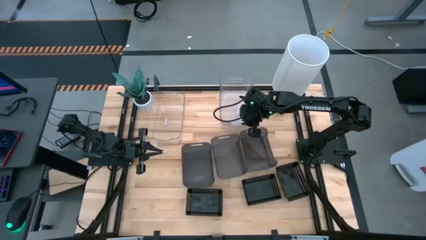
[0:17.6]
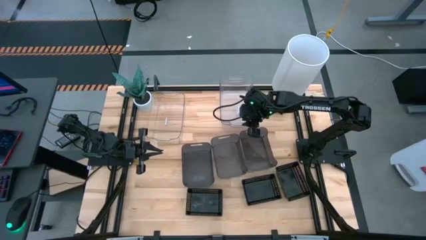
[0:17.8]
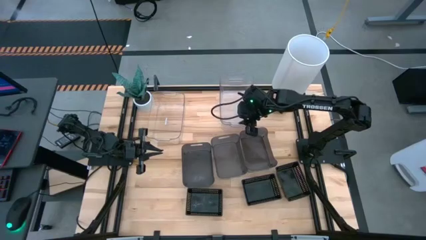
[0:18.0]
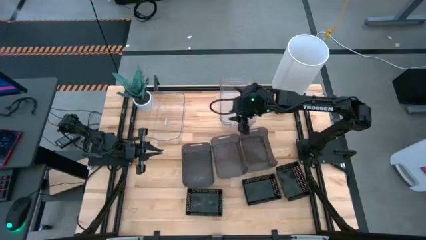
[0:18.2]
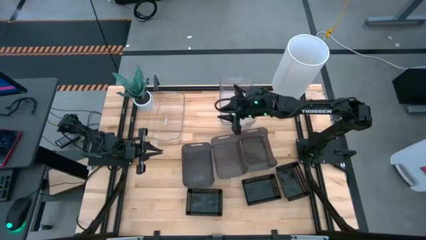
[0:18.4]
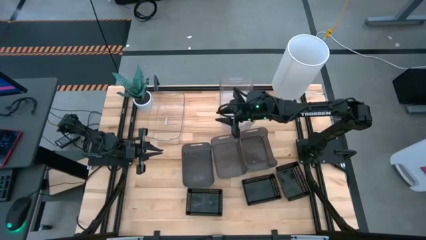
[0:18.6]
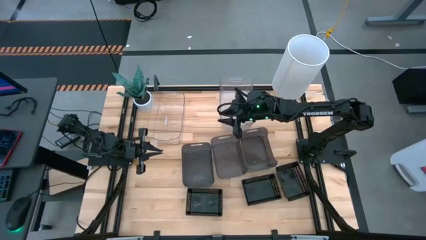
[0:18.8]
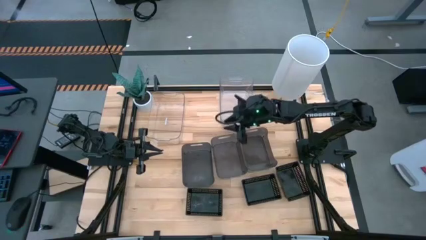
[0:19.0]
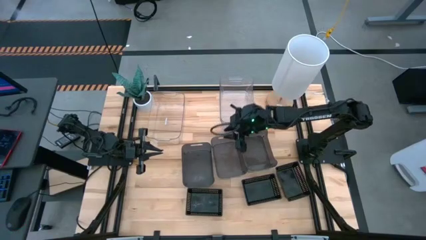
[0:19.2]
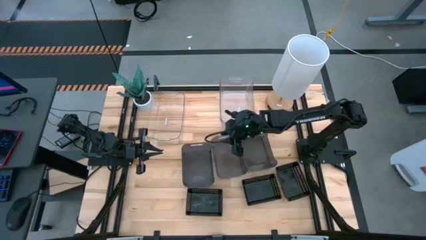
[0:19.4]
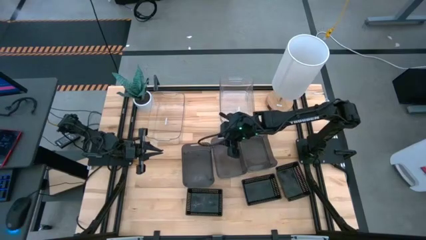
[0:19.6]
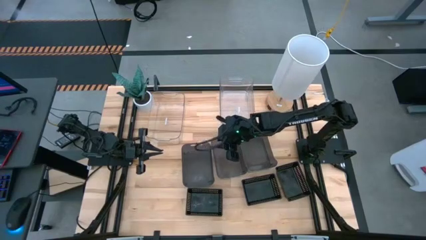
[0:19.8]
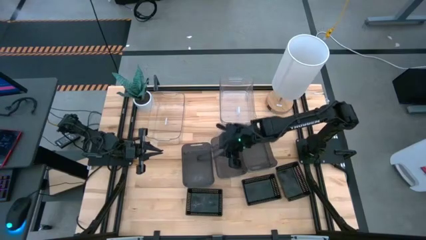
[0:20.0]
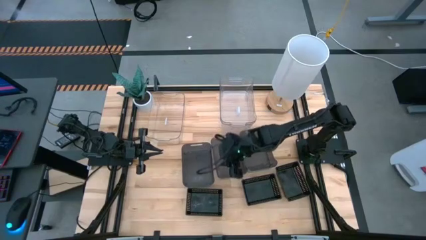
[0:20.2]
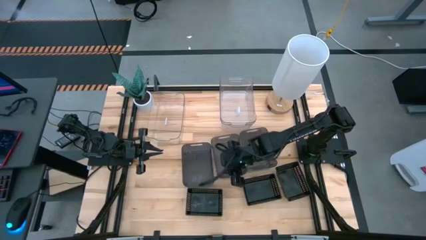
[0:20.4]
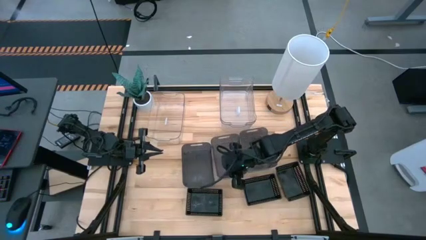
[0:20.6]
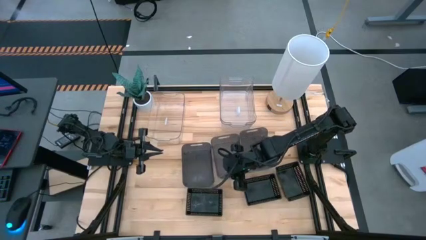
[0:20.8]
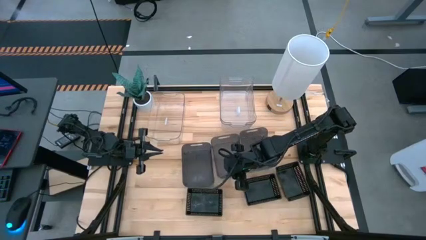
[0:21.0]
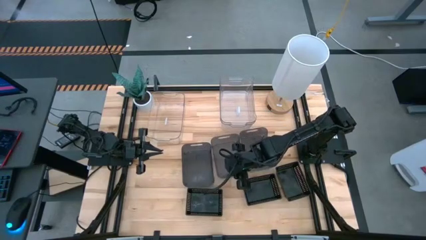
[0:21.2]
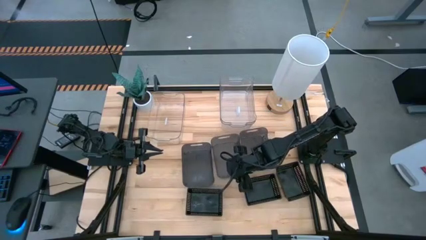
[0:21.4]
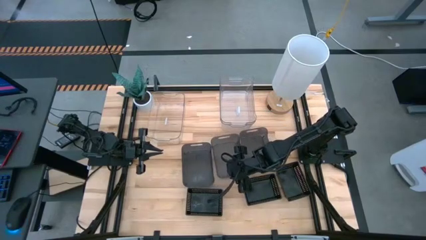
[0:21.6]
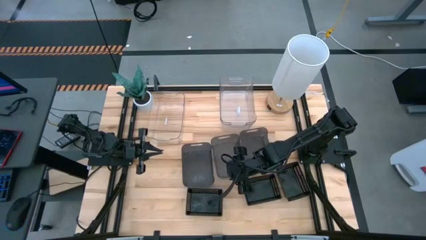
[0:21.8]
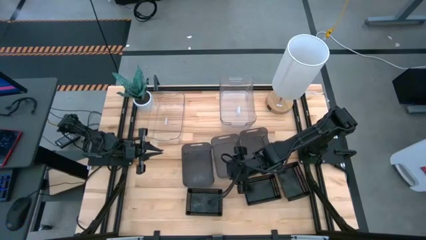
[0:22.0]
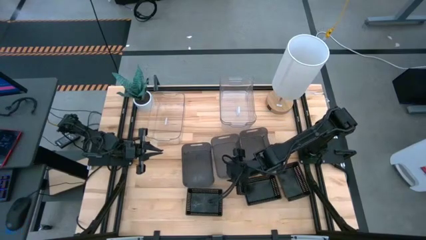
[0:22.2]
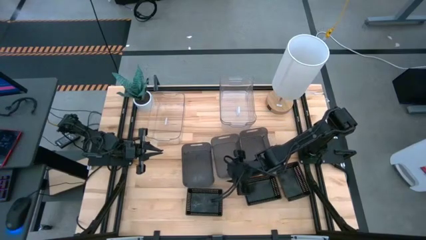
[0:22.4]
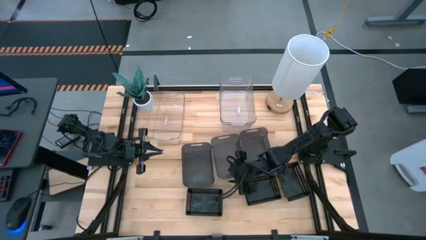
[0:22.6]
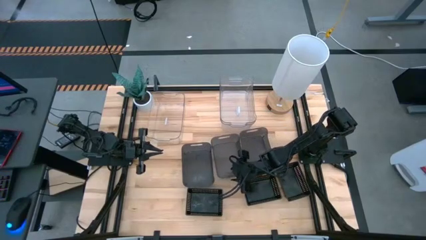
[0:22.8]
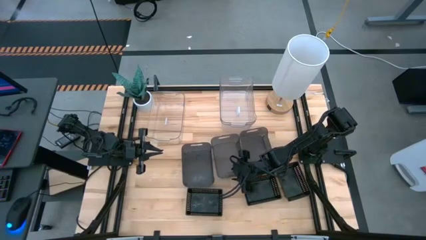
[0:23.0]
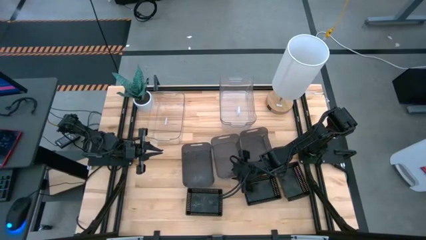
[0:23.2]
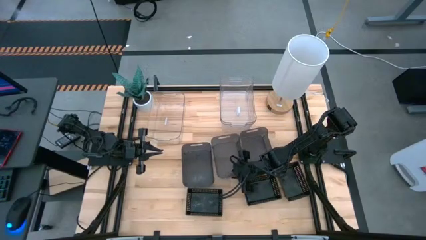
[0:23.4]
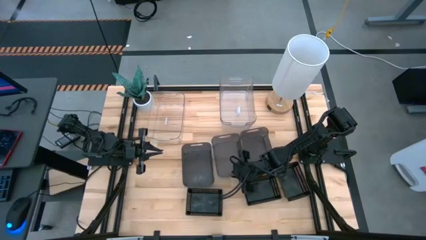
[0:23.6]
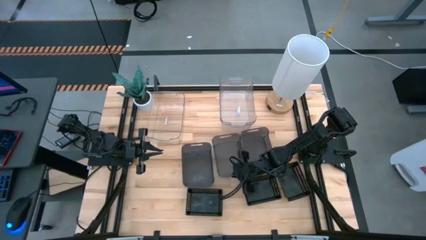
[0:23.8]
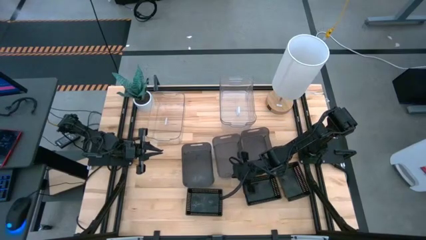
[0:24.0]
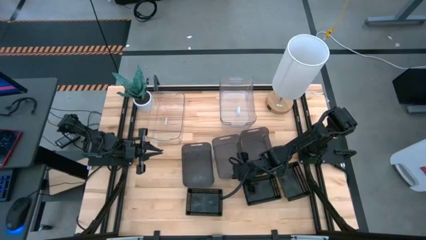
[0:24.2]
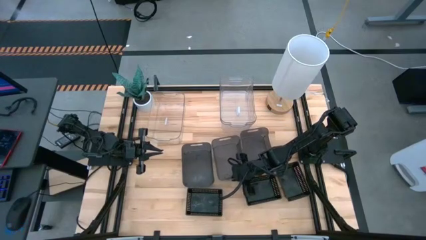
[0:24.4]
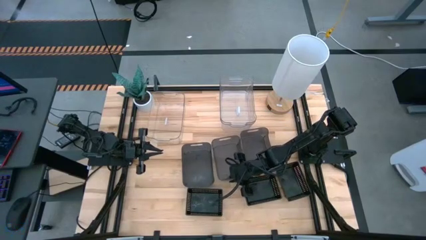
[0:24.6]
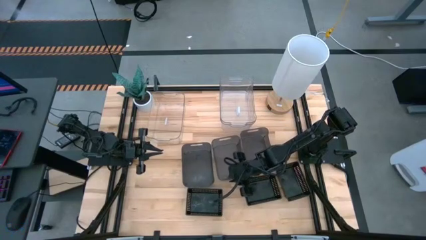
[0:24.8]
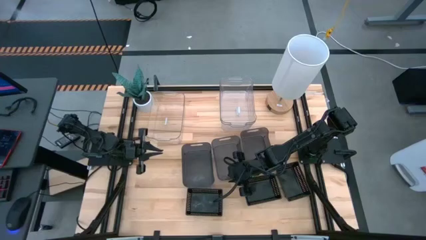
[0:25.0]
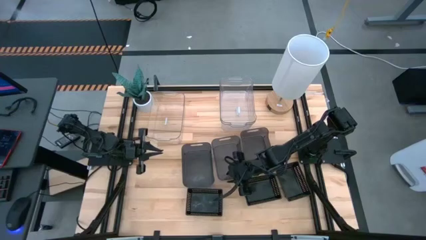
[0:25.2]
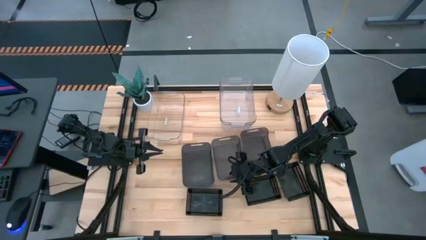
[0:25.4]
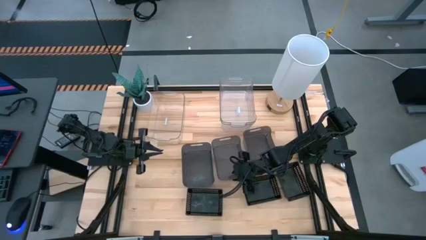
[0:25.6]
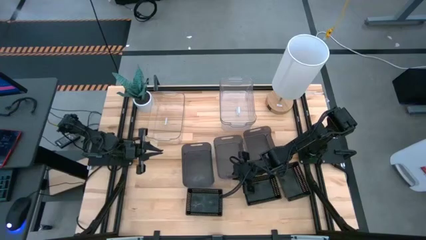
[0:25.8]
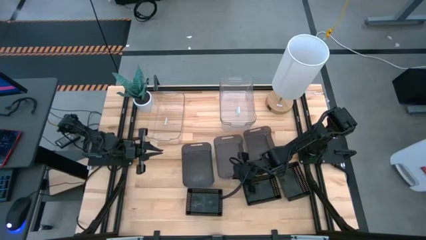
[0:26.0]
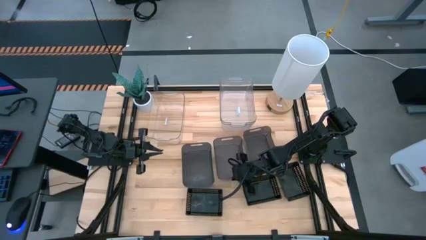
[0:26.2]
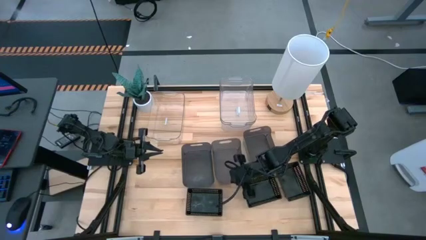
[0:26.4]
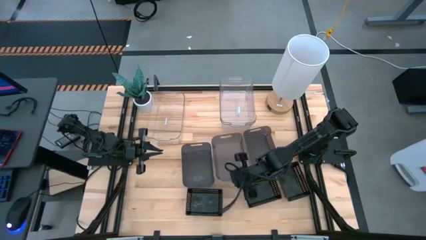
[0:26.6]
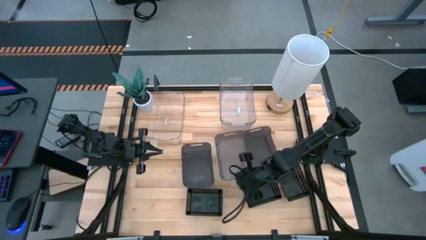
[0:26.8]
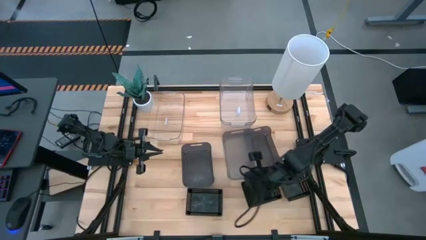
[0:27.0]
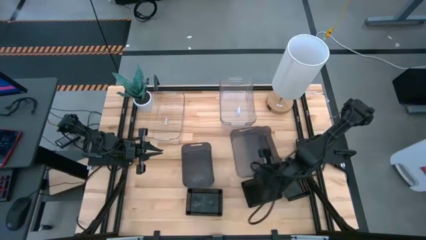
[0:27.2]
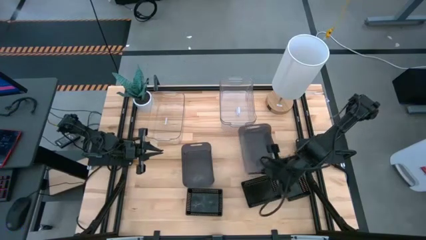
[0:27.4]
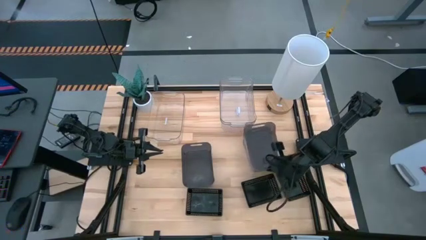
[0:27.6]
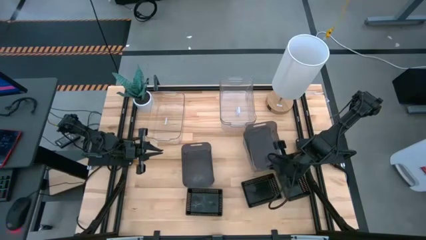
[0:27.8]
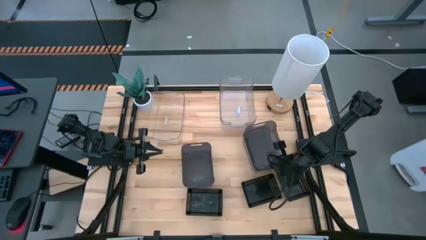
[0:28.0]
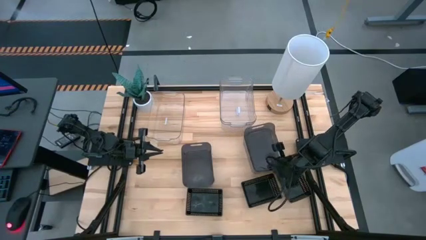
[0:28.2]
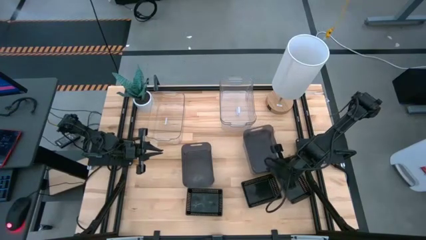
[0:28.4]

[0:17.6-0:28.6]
Stack the middle gray bin on top of the right gray bin

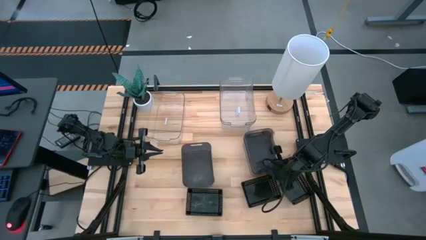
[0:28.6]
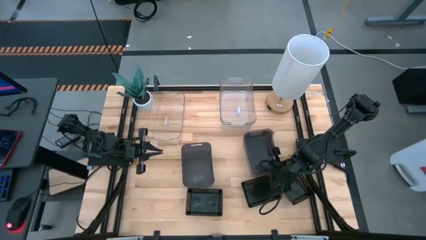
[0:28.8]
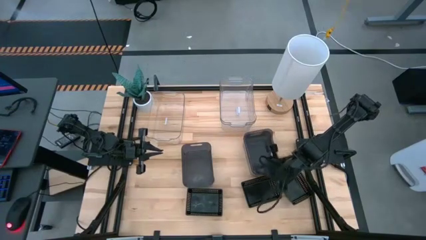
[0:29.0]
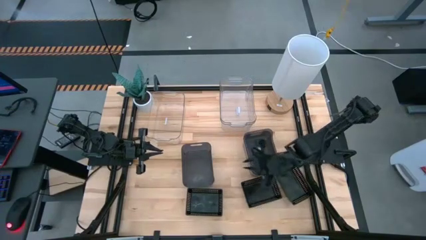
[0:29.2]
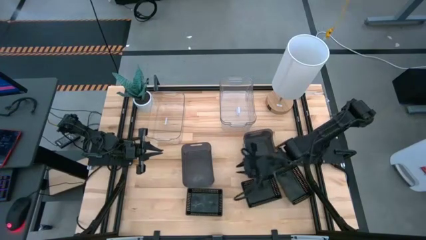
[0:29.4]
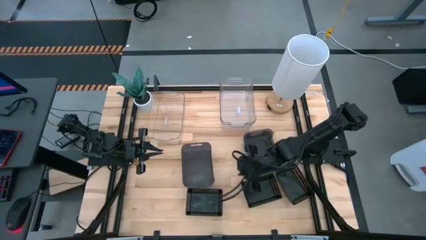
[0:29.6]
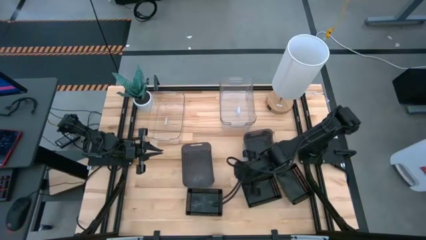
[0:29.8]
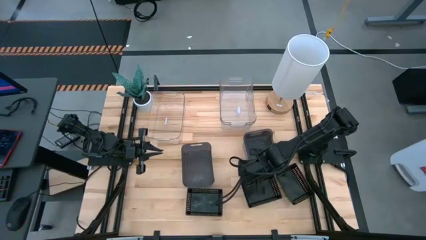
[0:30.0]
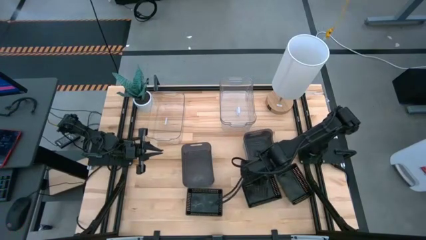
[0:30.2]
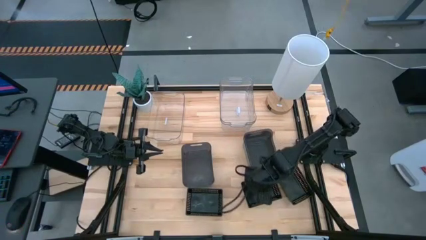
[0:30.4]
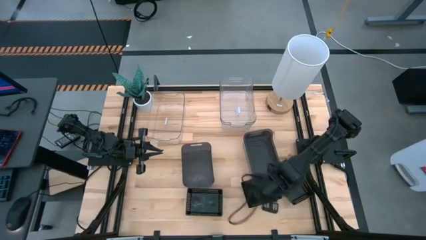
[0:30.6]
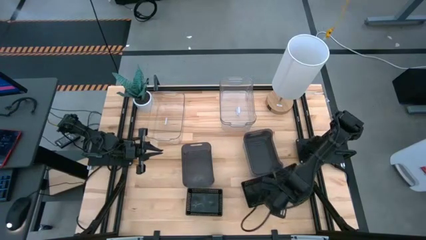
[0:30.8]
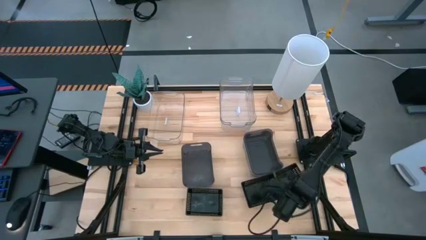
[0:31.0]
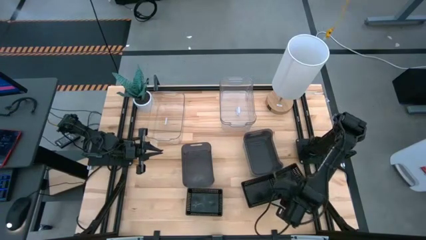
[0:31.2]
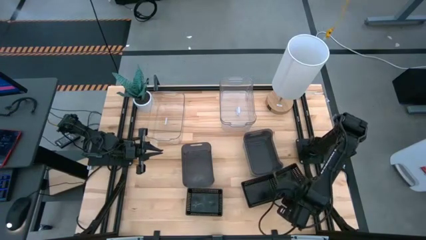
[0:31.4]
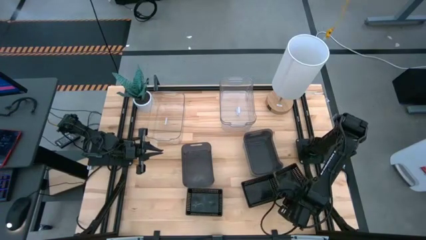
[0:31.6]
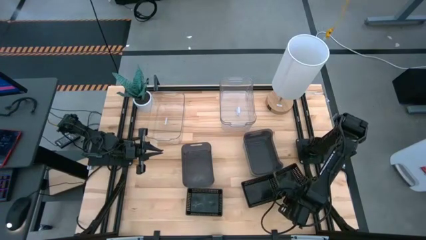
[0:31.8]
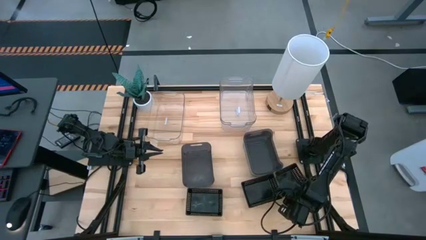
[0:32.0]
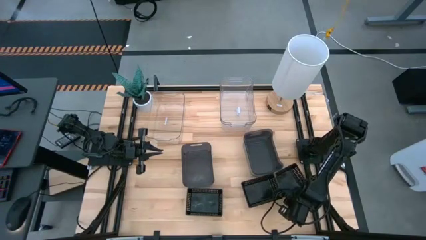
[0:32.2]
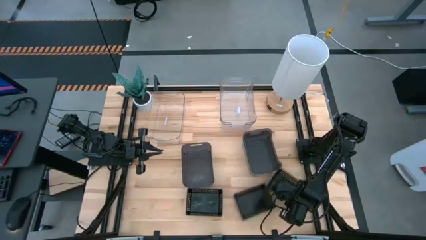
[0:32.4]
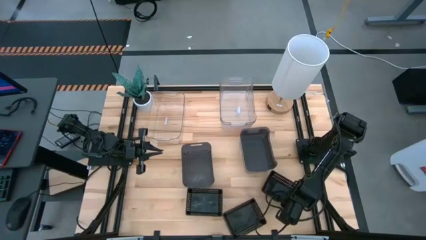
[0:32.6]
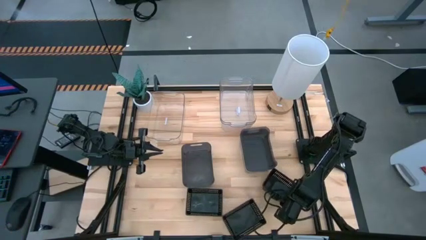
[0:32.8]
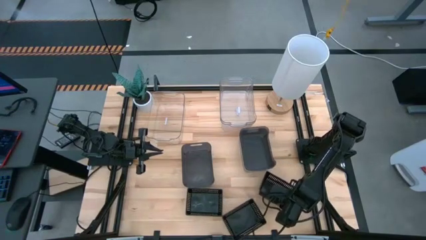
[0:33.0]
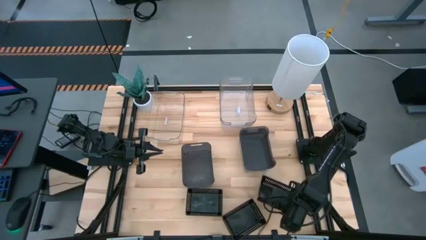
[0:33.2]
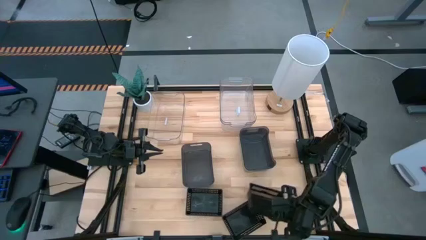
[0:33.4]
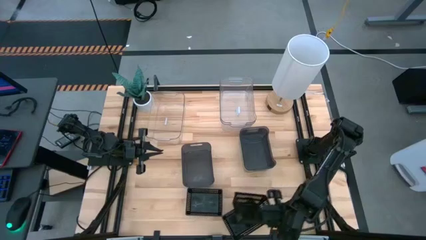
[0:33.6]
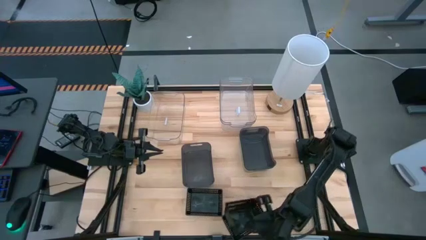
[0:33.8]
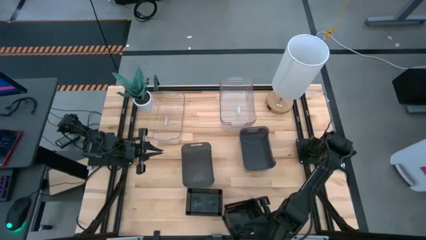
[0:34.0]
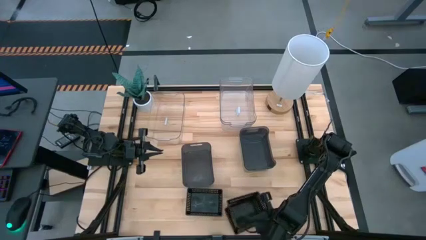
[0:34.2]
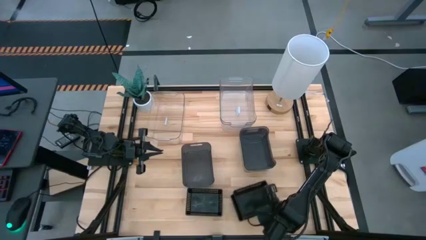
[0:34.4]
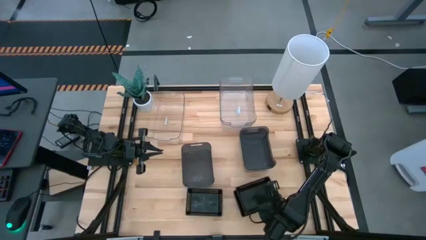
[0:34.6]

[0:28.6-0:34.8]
Stack the right black bin on top of the middle black bin
